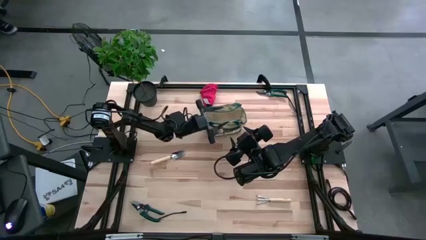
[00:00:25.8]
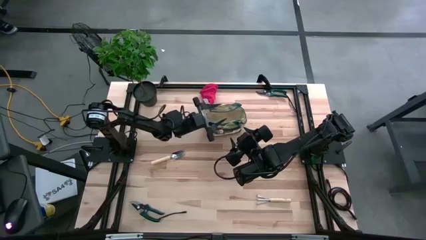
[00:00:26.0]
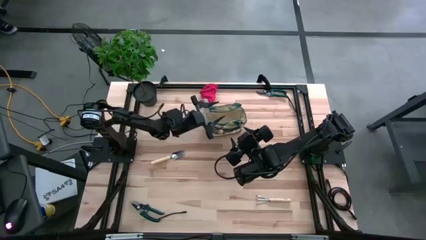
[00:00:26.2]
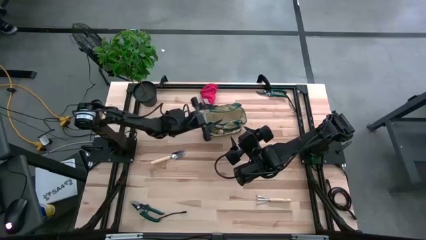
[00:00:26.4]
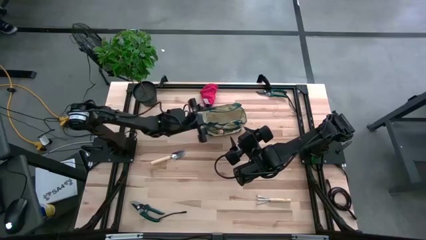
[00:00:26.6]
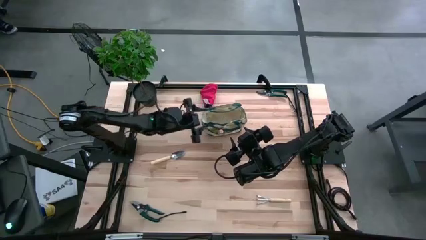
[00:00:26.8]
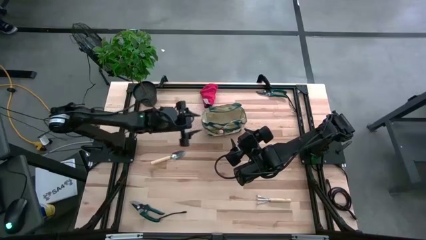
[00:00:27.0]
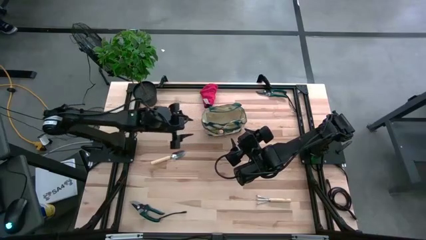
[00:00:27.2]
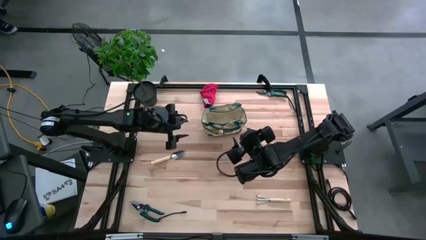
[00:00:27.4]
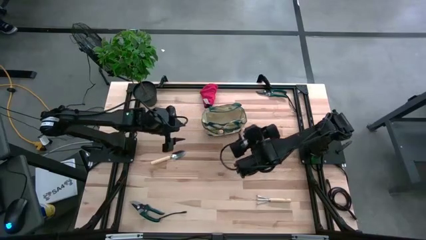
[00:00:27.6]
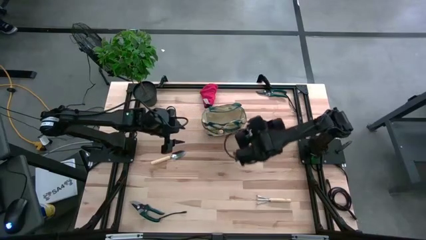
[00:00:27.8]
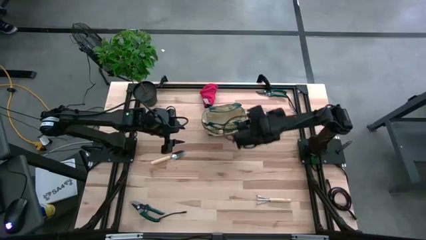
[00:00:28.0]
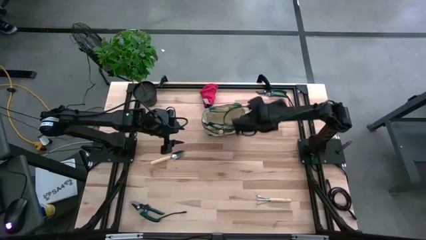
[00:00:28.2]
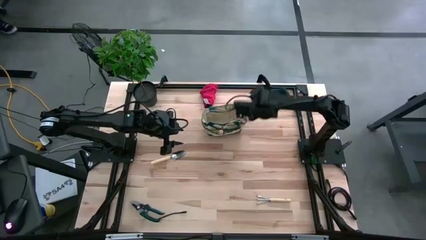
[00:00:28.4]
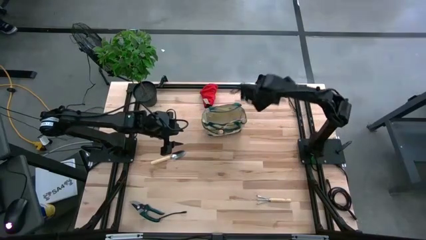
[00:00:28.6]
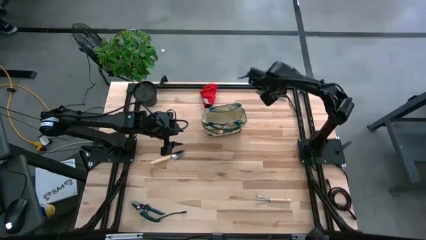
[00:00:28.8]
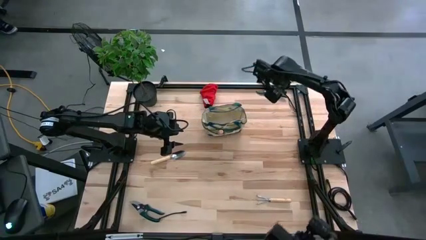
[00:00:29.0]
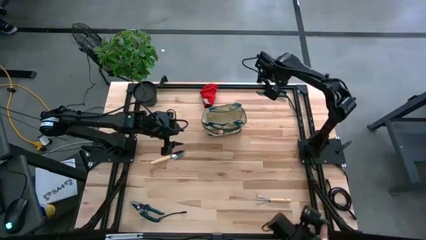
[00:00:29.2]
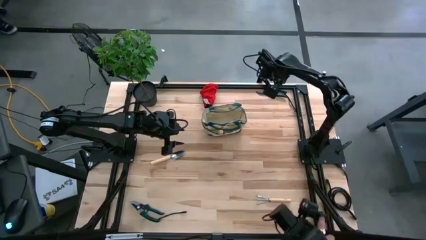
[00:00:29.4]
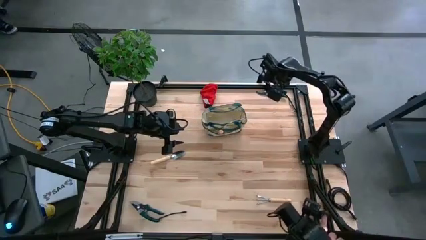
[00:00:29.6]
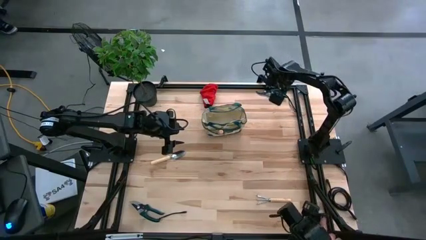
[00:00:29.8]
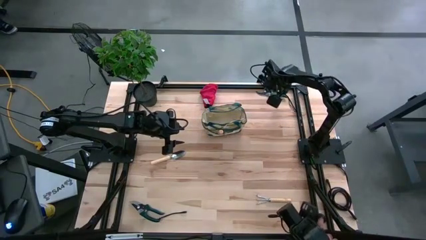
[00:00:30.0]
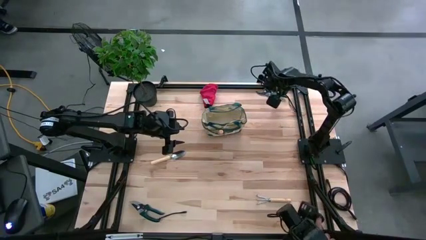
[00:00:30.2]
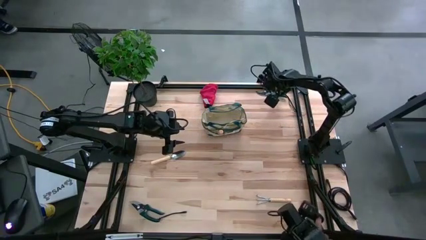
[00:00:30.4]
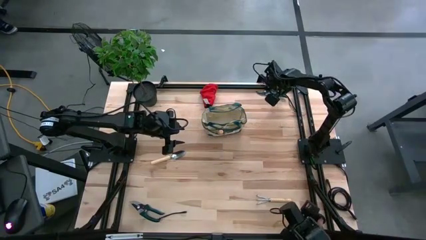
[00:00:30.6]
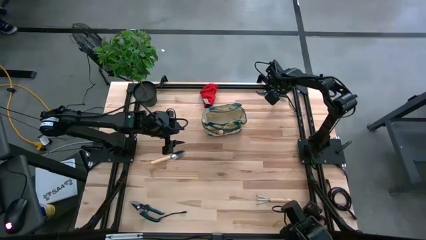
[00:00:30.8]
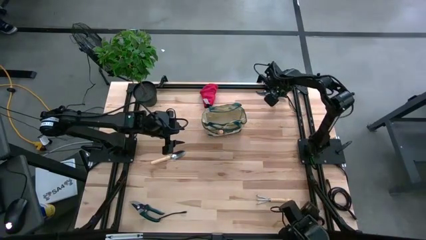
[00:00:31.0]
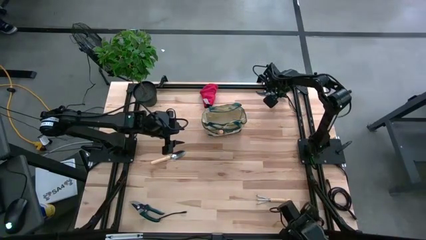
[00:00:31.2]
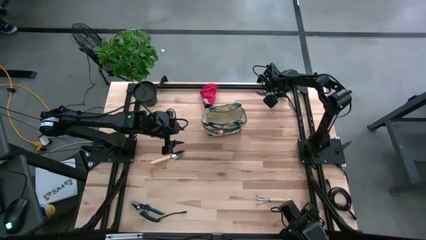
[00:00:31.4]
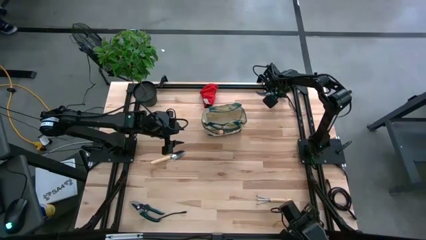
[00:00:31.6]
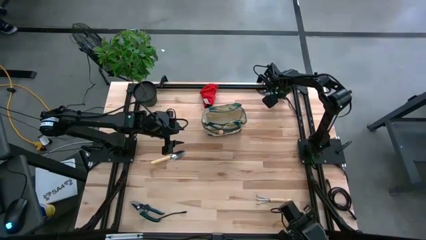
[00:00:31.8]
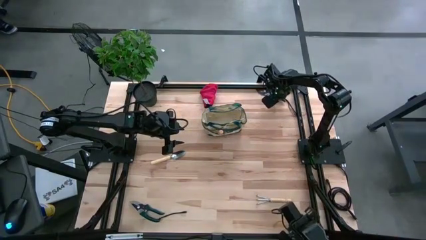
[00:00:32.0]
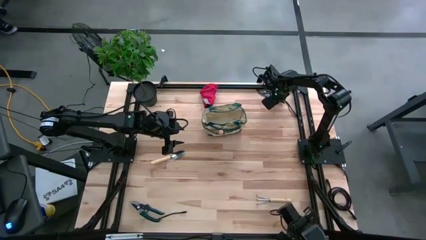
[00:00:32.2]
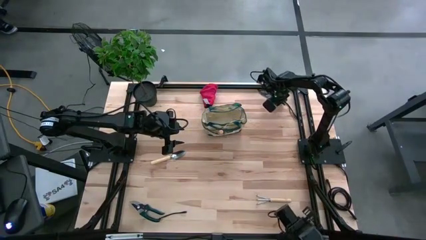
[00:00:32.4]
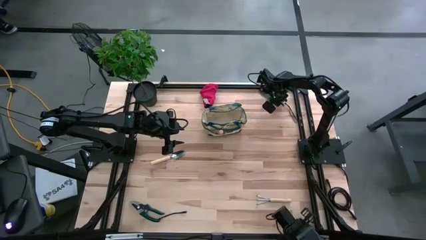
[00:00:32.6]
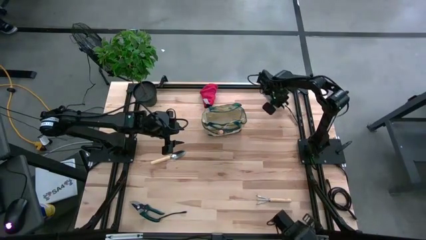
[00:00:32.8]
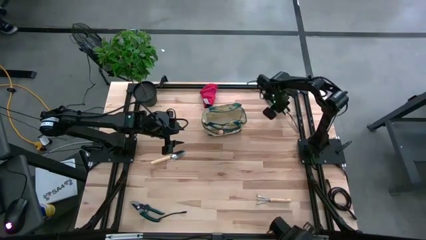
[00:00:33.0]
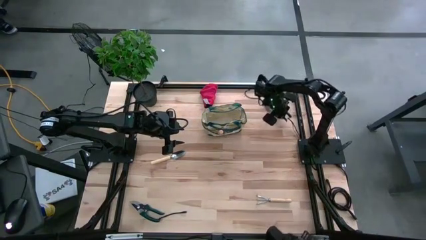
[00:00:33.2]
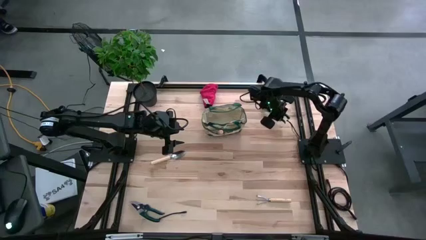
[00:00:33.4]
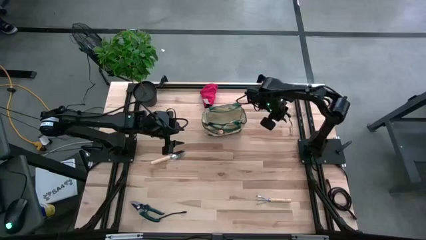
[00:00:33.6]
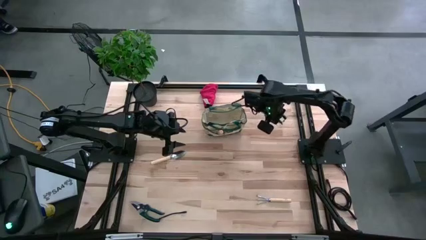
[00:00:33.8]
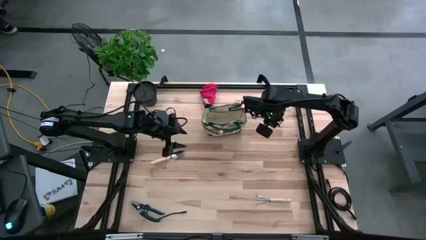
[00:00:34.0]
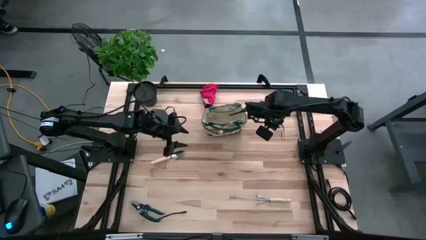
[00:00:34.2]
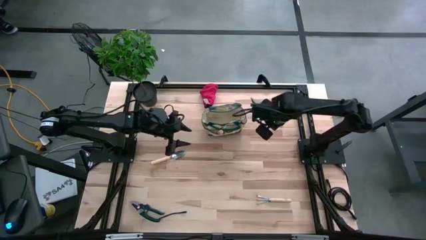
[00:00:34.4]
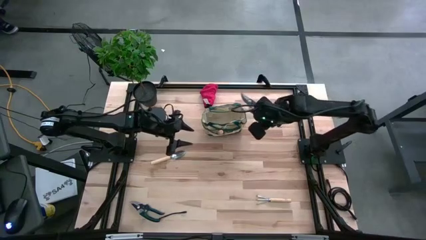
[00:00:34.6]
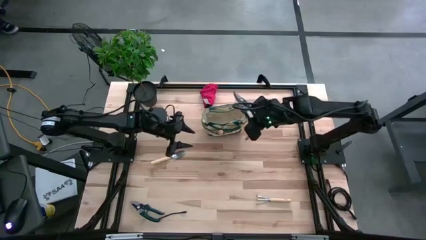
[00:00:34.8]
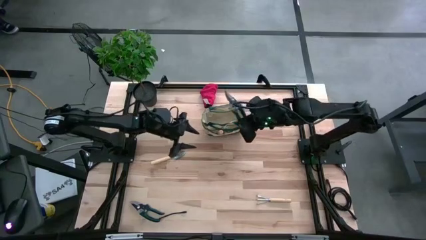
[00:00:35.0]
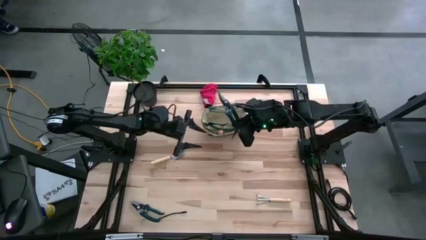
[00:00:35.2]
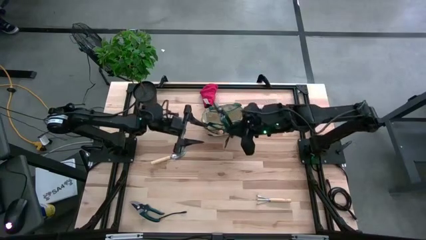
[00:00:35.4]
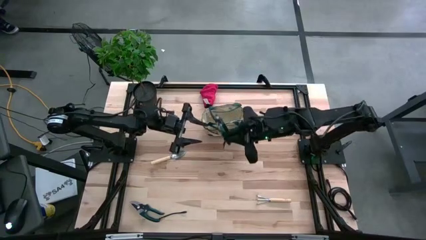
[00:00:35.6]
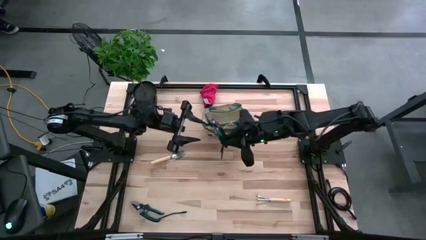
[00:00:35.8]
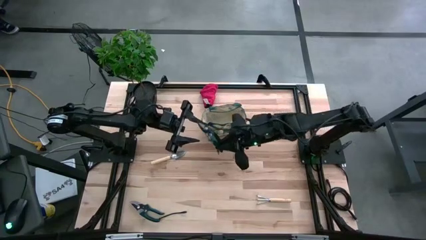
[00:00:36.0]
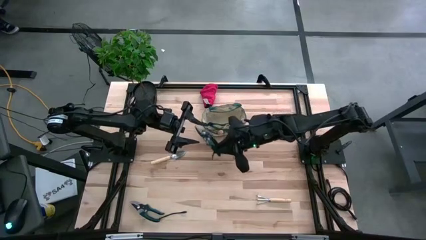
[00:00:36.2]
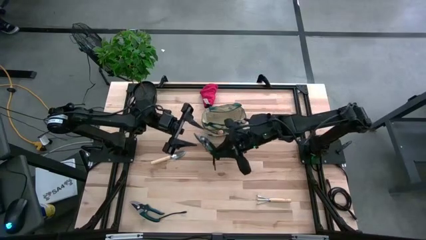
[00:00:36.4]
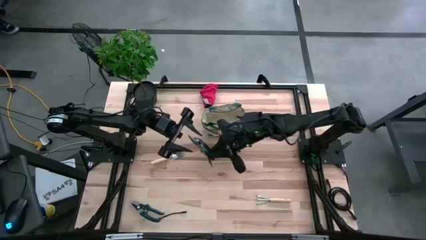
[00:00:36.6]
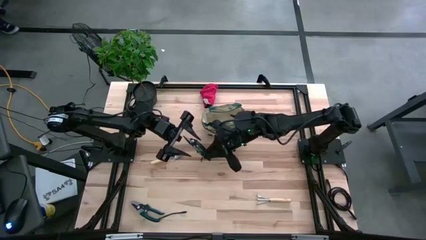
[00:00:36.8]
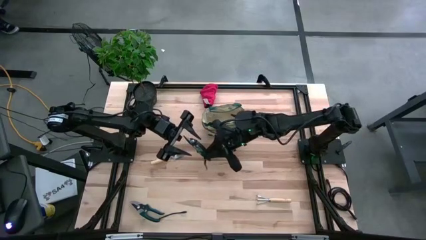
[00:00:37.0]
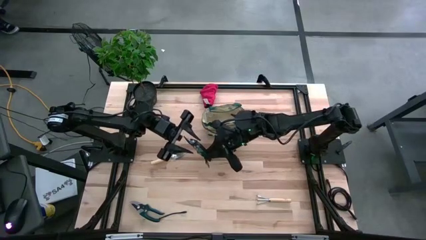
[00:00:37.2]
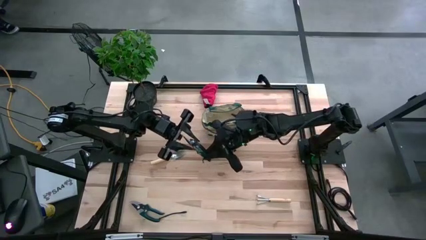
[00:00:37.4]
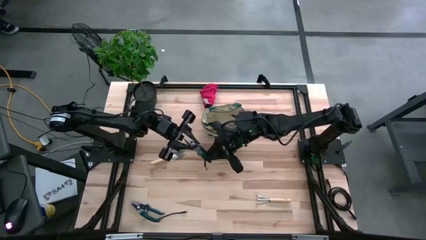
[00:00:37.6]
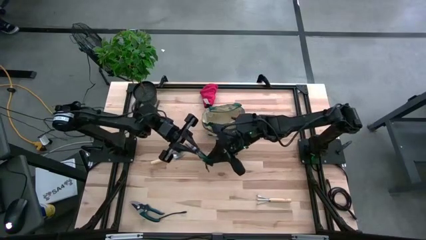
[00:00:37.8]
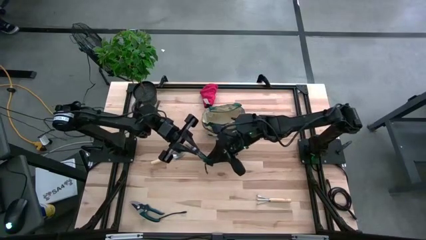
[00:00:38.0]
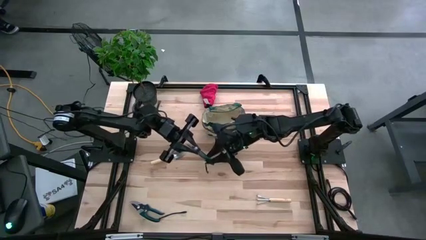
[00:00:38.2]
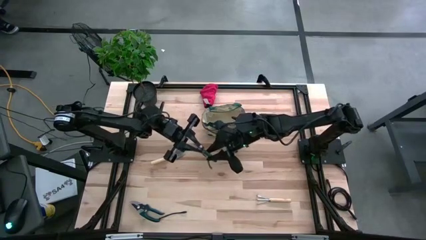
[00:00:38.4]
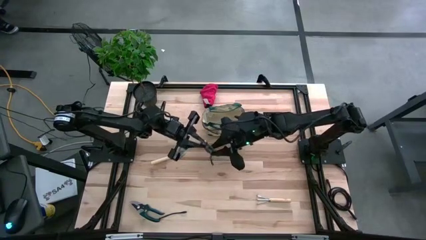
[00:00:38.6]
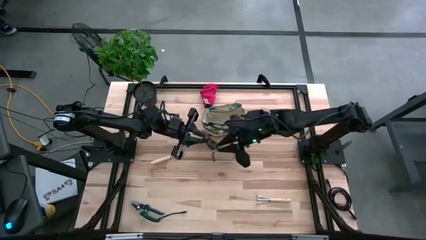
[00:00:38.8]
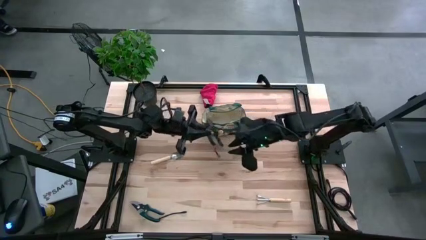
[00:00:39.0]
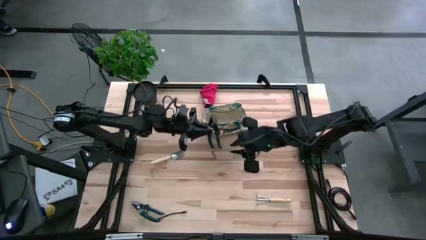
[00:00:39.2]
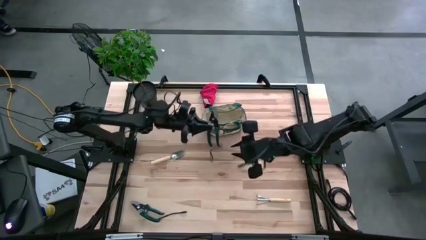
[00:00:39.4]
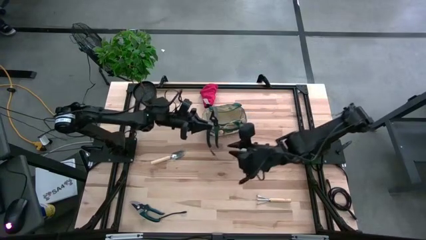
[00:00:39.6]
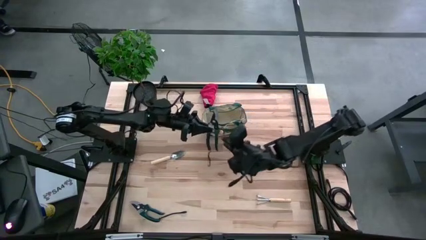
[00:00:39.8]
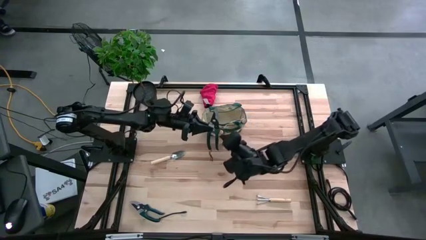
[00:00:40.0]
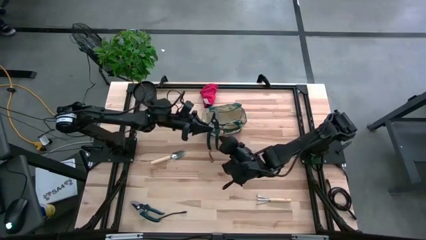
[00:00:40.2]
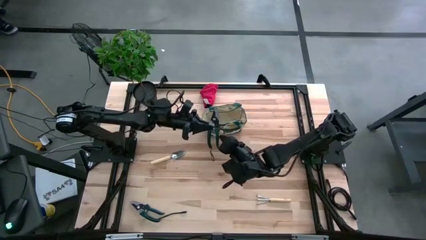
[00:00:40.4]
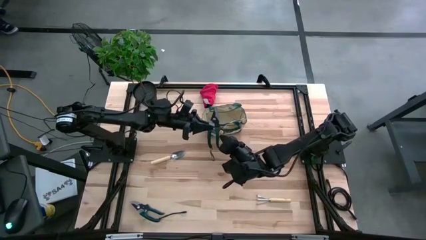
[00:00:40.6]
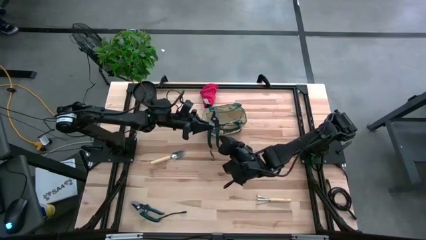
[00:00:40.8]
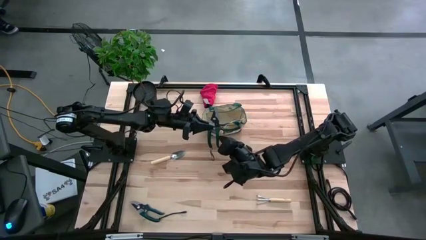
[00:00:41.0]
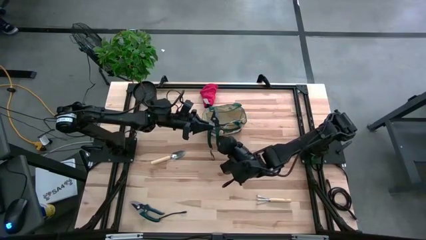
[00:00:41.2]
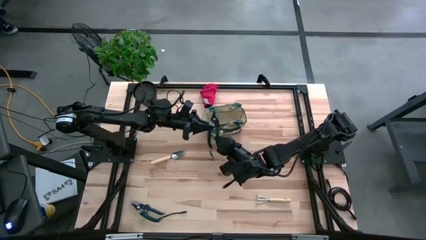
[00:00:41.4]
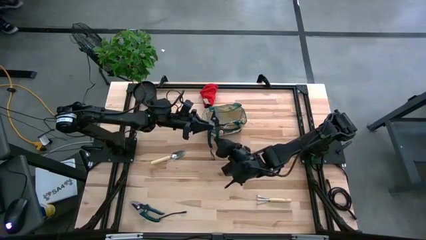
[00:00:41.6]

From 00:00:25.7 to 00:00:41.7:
Task: Pick & Place Garden tools in Gardening bag
Put the top black shear scissor into the gardening bag
